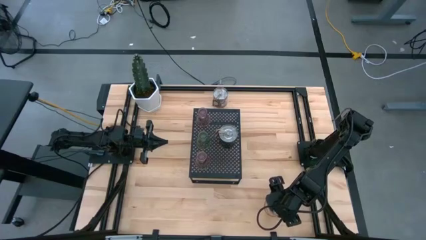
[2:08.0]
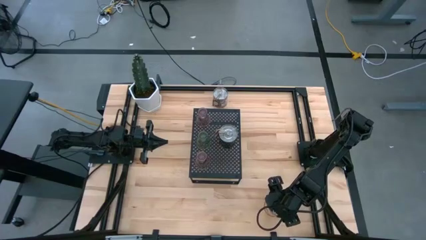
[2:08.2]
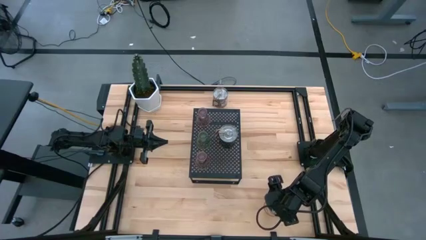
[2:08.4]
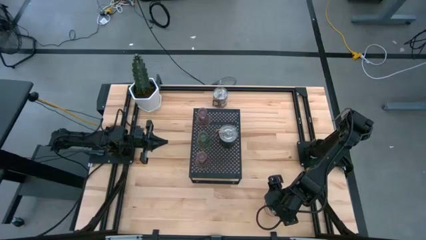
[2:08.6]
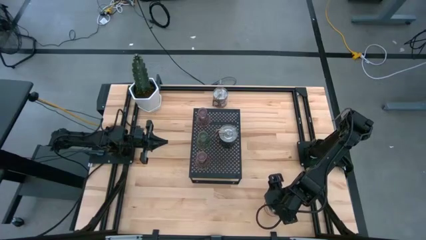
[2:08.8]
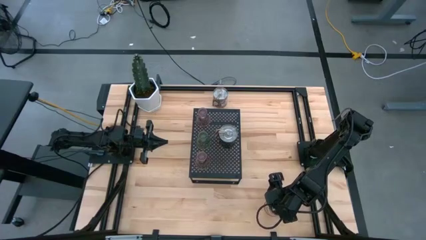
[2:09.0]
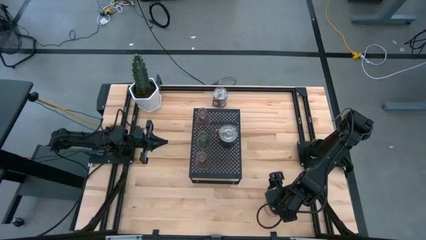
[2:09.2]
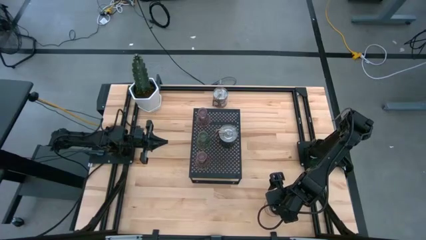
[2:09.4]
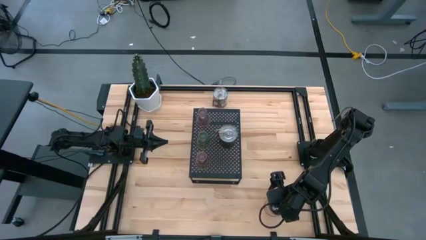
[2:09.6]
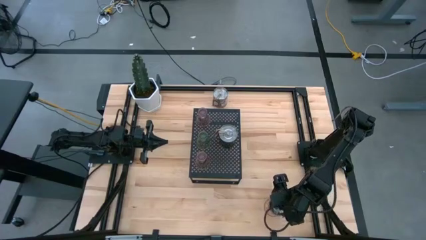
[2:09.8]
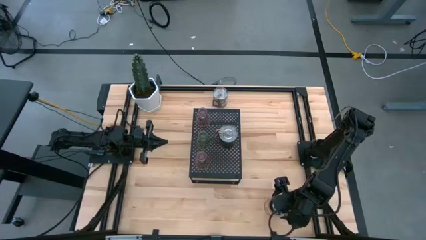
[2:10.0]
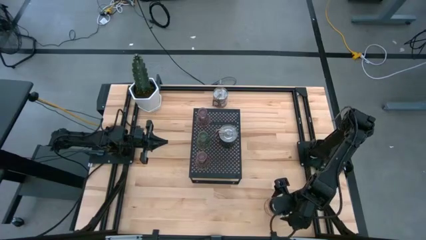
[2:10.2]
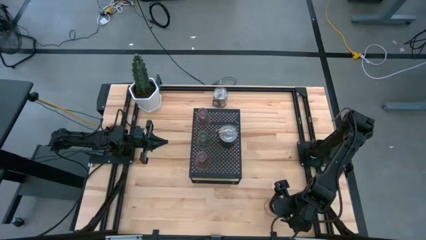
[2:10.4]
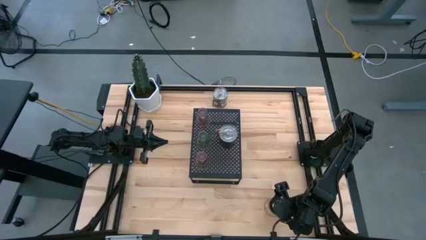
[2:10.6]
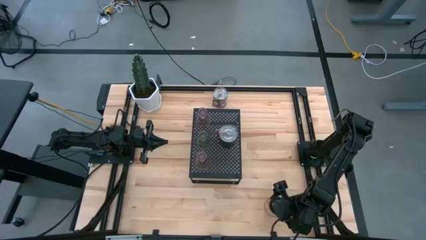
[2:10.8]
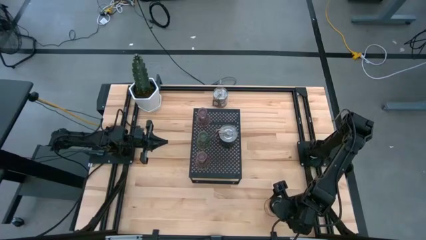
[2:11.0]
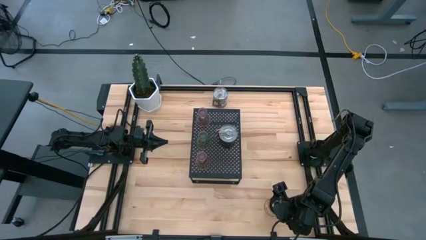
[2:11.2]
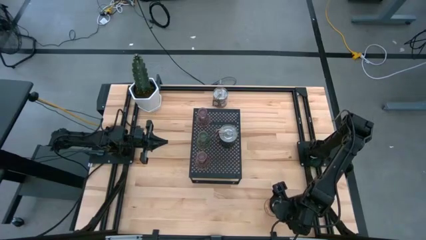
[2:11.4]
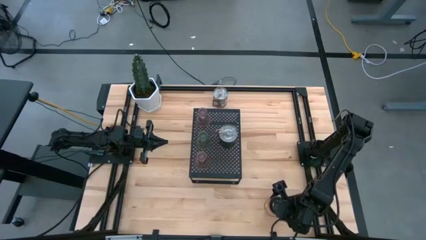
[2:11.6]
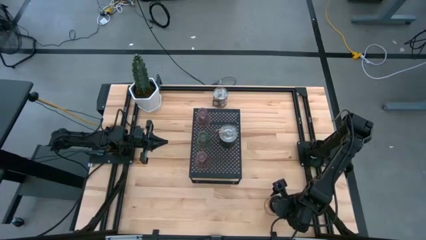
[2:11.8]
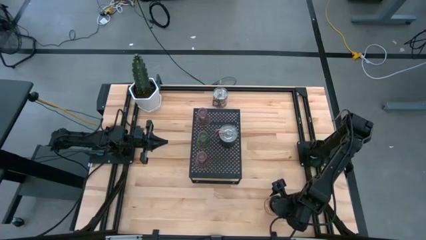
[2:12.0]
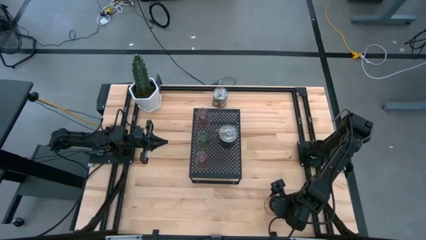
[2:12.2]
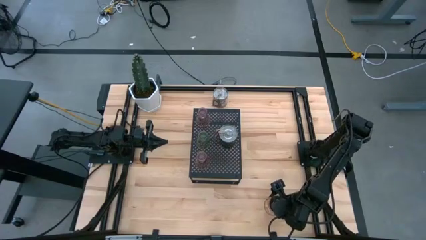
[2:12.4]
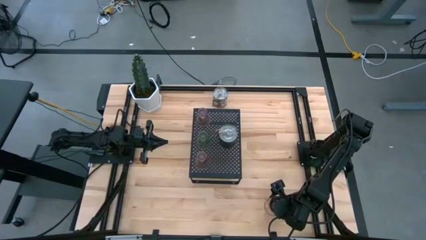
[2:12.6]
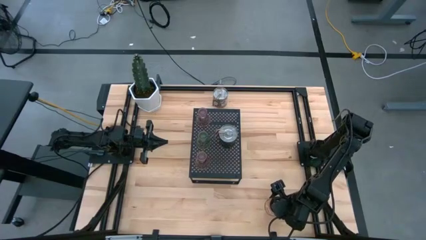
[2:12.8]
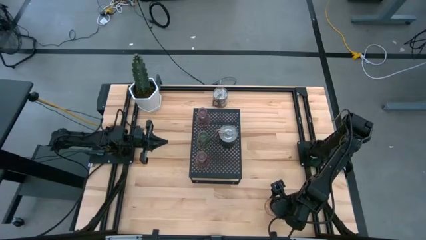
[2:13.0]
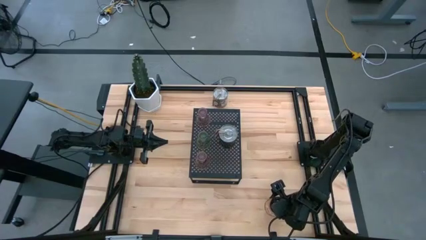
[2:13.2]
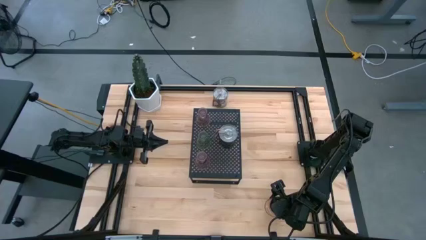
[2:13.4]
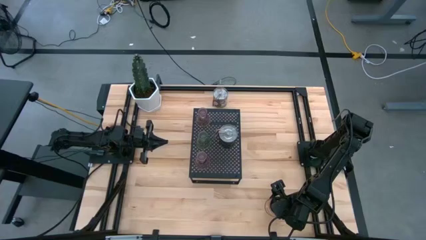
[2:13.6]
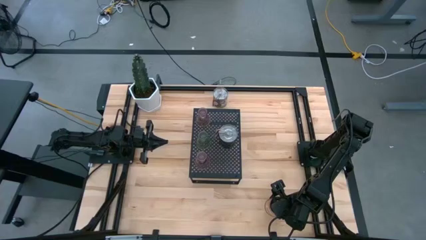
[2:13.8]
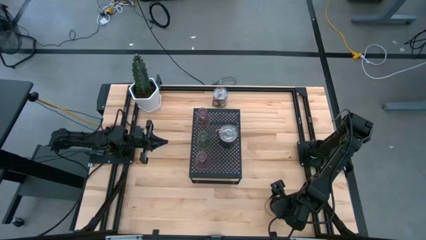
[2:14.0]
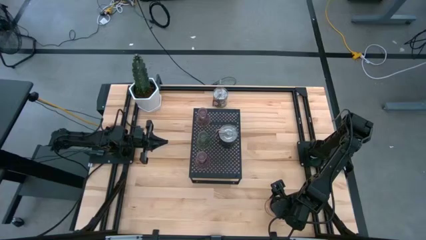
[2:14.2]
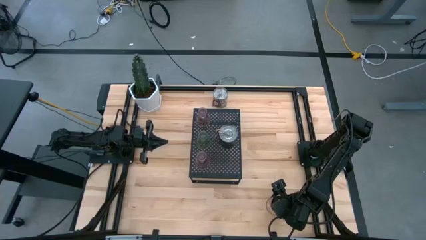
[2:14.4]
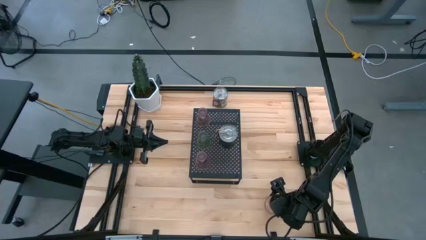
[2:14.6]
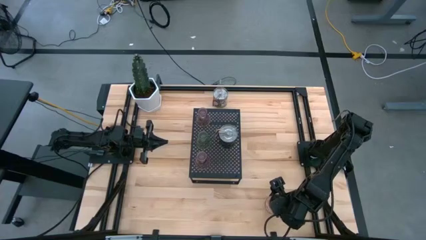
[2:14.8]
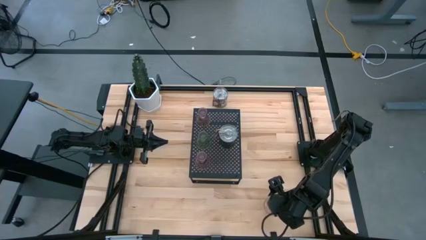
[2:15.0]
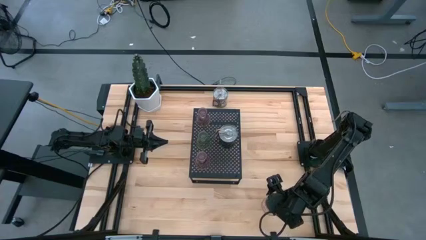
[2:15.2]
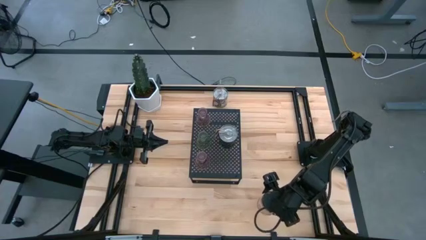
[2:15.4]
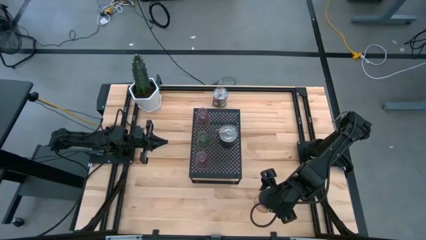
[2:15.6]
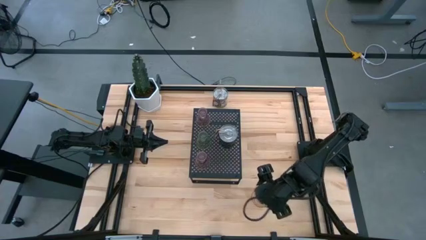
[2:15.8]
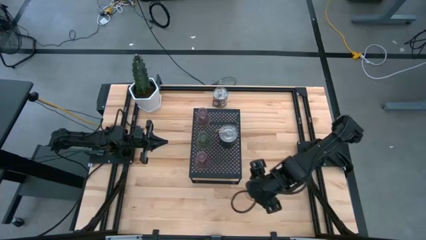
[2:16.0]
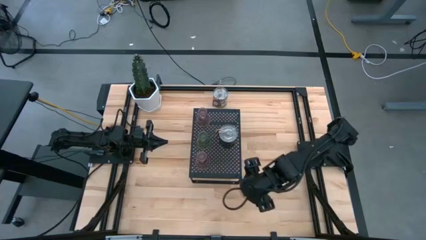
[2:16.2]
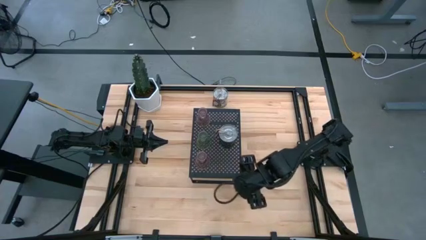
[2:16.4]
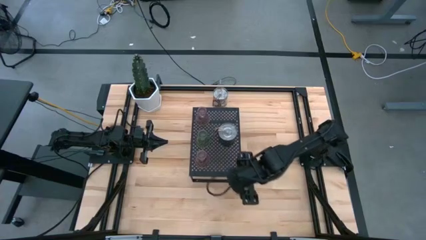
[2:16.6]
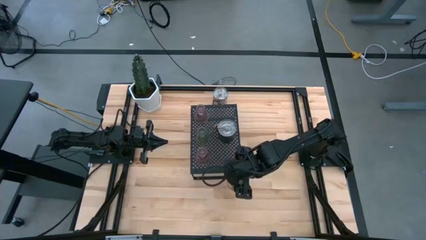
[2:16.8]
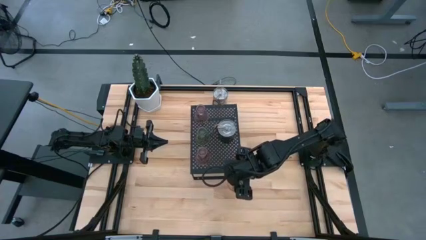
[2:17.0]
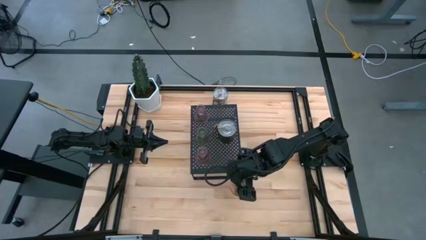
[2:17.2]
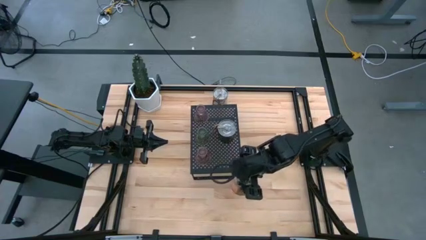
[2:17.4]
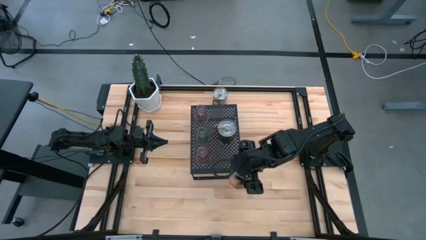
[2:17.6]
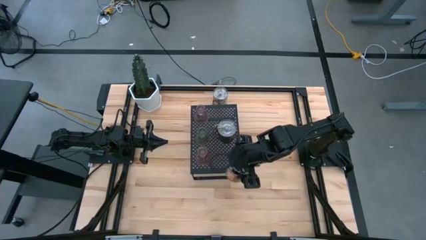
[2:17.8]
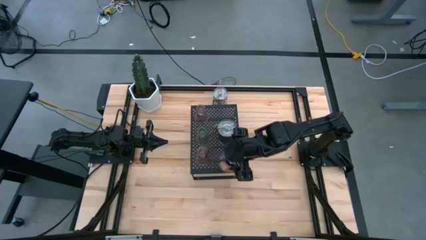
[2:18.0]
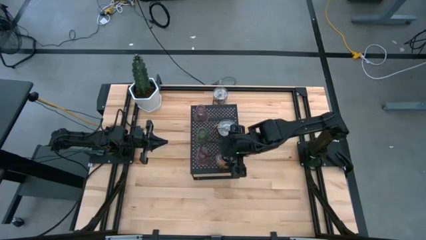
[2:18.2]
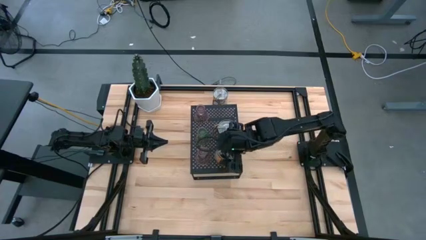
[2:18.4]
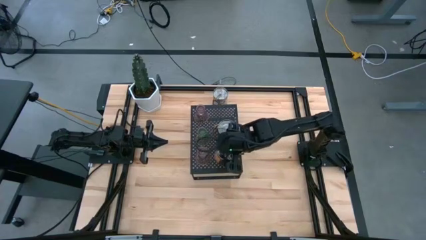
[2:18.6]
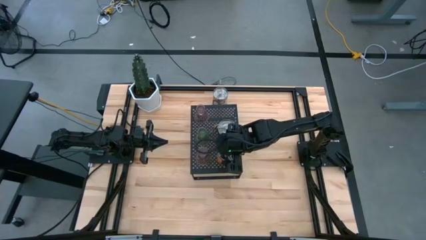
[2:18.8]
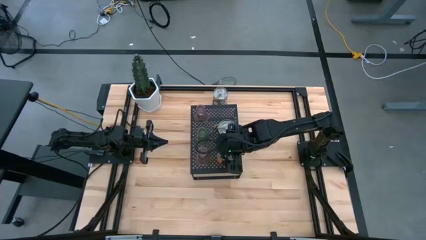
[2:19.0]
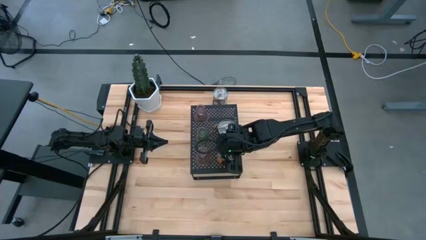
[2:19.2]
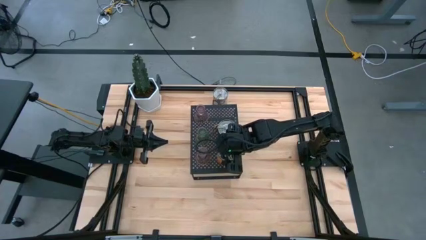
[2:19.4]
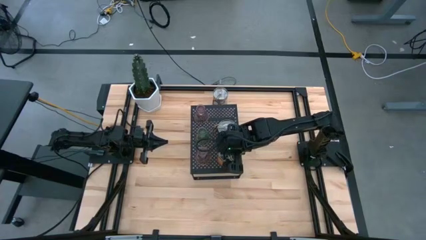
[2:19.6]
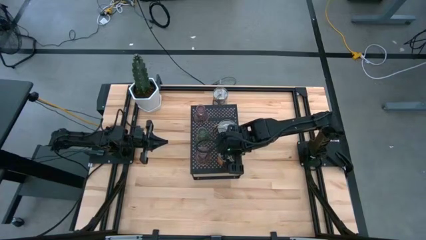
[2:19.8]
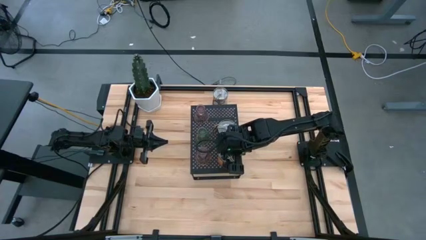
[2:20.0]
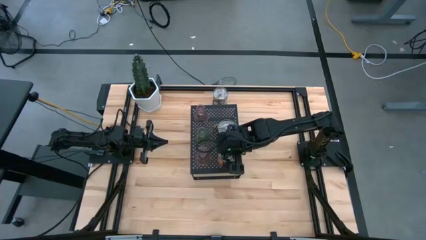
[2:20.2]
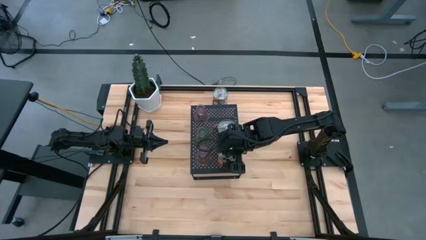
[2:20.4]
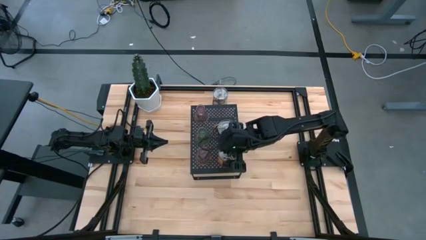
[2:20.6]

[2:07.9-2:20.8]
Task: Pick & Place candle stick holders
Put the bottom brown scented candle on the shelf

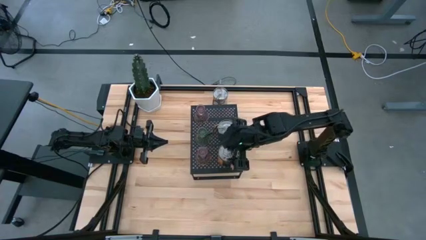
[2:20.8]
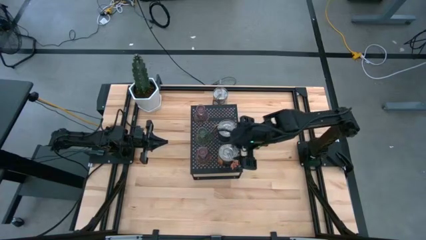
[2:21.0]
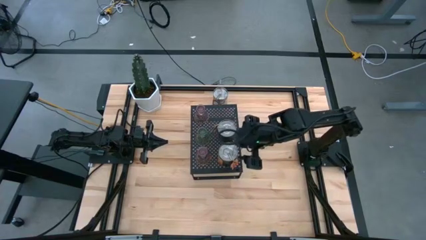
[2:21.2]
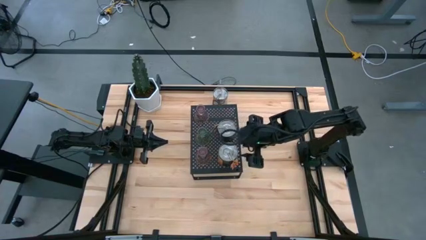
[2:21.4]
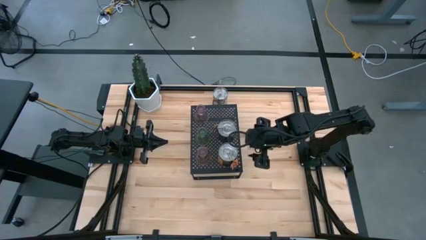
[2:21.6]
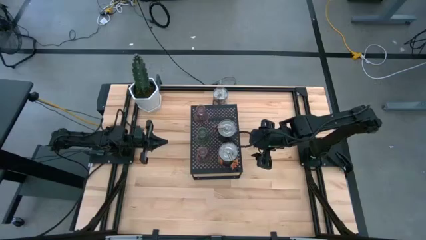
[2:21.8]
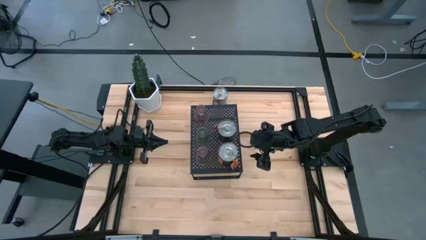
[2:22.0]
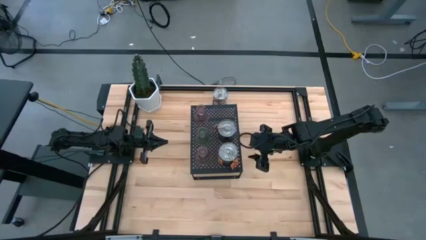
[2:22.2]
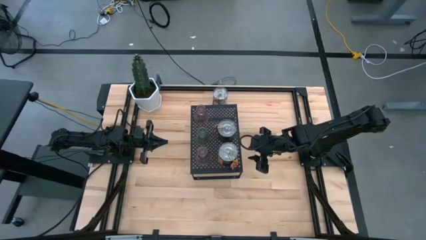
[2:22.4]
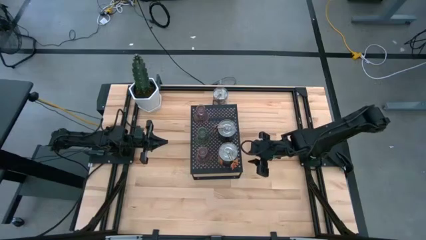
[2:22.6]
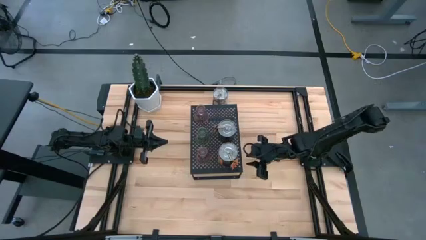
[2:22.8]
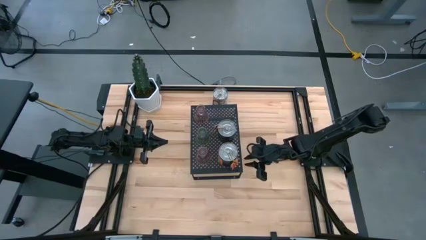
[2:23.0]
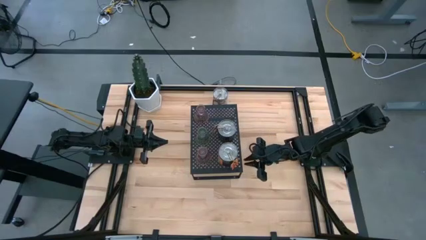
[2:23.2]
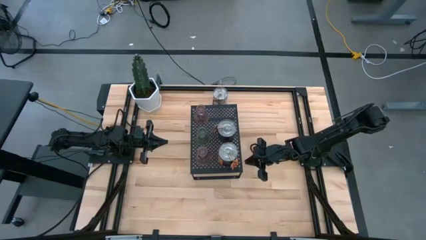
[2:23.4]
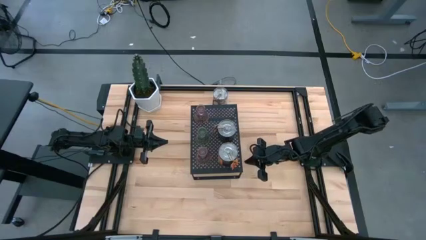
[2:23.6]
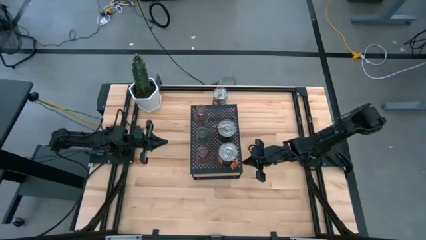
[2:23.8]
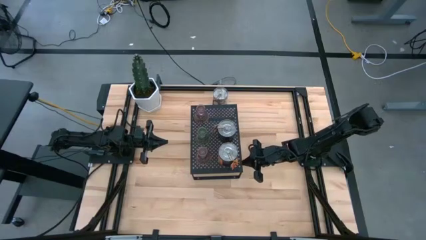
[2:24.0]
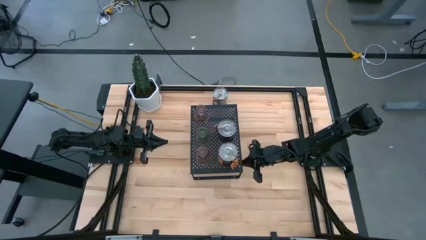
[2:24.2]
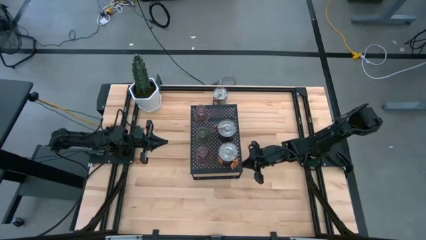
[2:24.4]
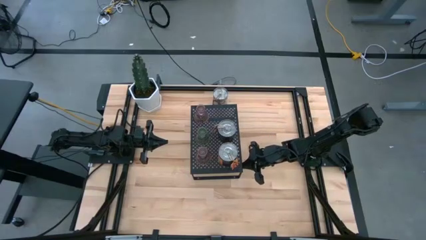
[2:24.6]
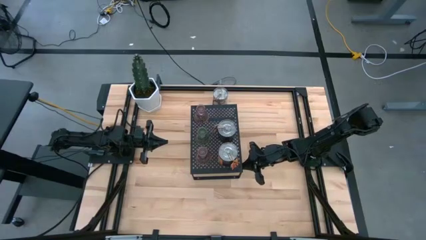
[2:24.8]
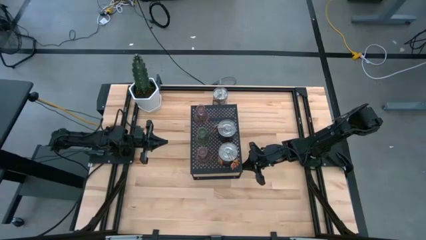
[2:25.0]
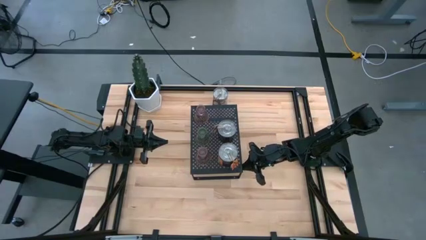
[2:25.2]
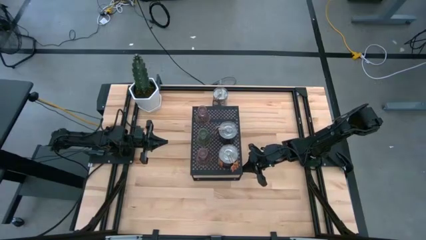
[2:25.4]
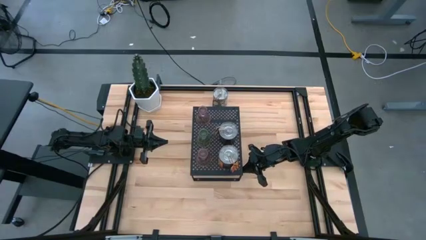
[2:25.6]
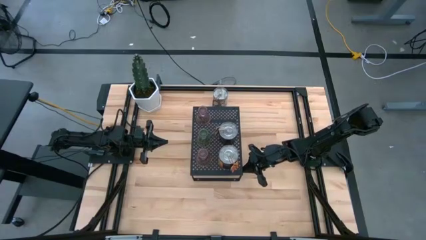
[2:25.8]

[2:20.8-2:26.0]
Adjust the shelf
